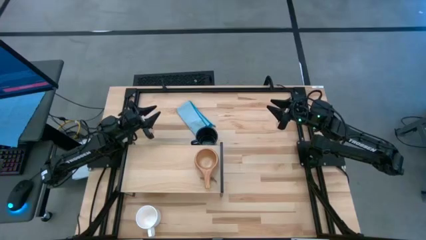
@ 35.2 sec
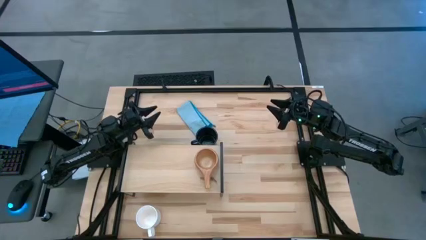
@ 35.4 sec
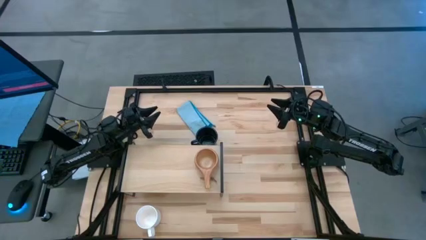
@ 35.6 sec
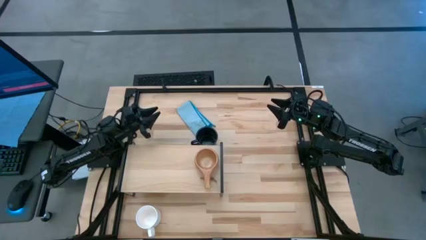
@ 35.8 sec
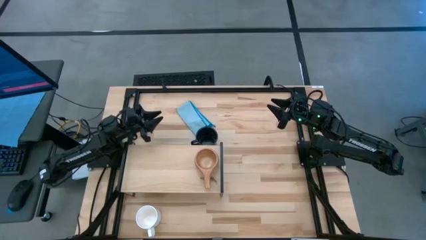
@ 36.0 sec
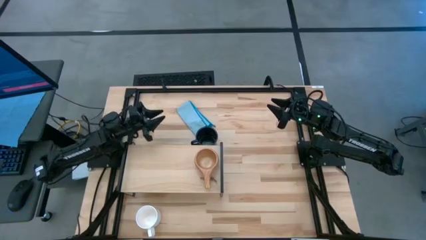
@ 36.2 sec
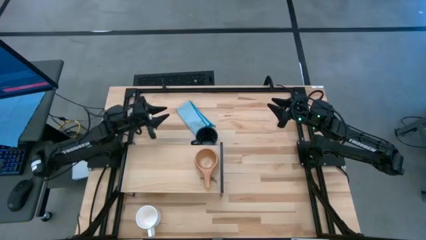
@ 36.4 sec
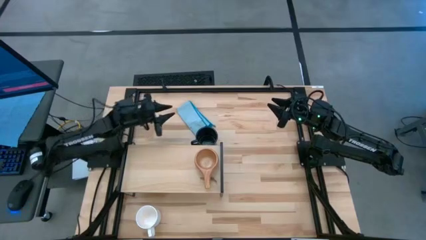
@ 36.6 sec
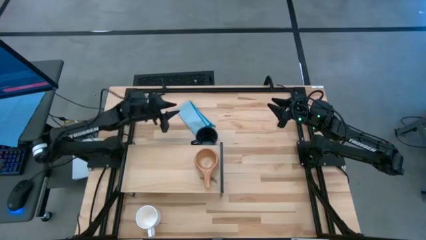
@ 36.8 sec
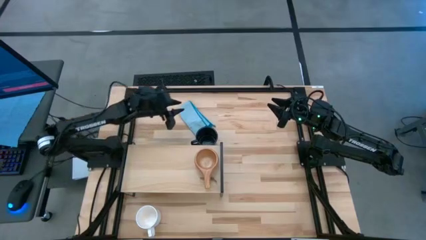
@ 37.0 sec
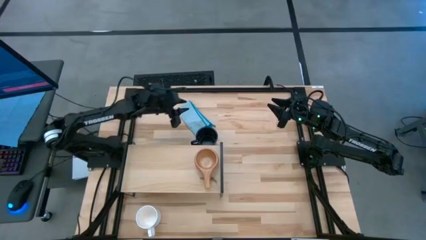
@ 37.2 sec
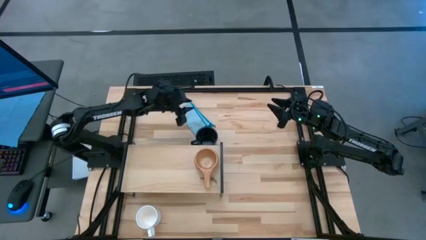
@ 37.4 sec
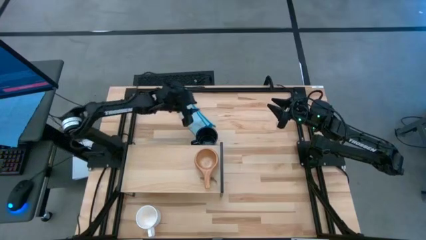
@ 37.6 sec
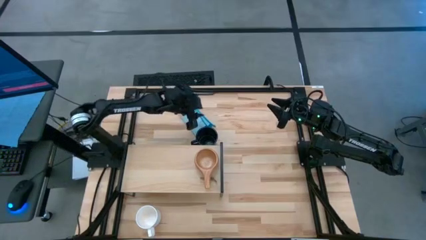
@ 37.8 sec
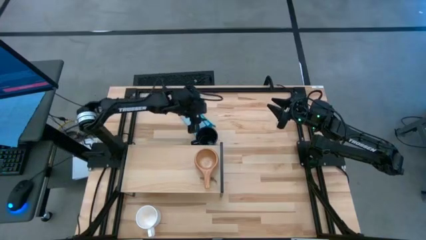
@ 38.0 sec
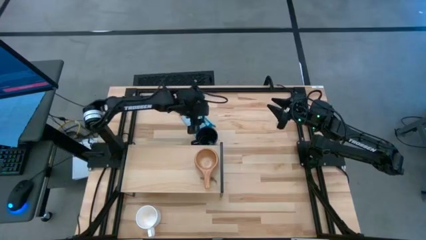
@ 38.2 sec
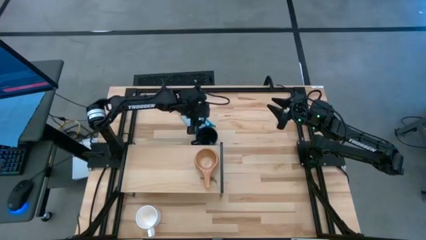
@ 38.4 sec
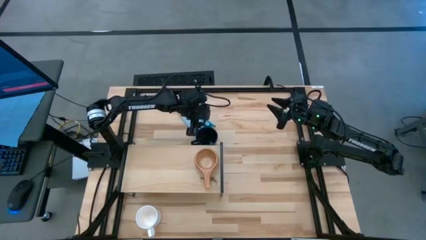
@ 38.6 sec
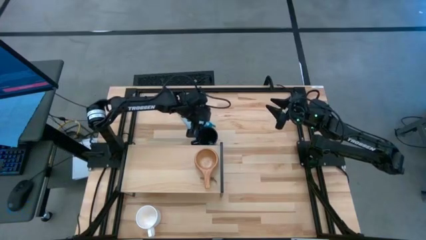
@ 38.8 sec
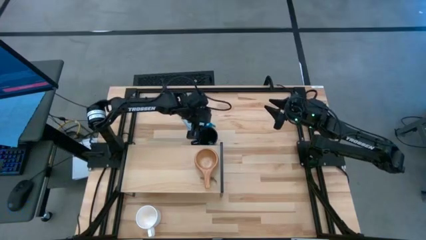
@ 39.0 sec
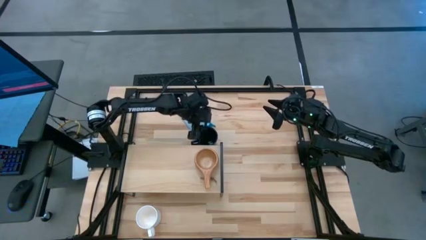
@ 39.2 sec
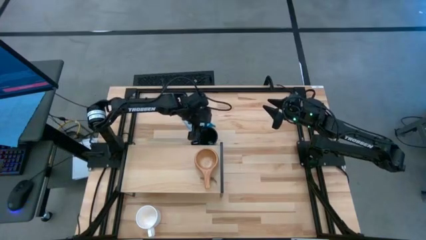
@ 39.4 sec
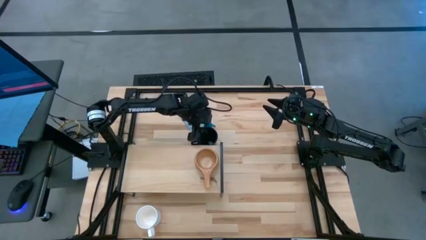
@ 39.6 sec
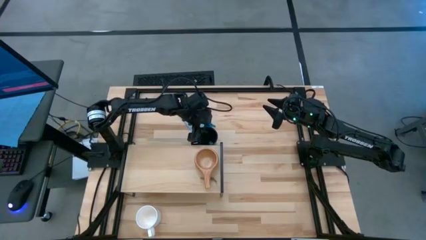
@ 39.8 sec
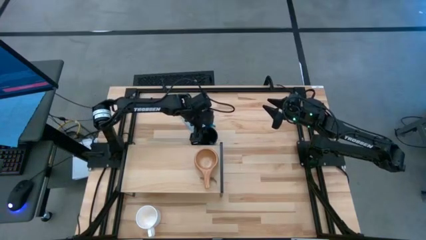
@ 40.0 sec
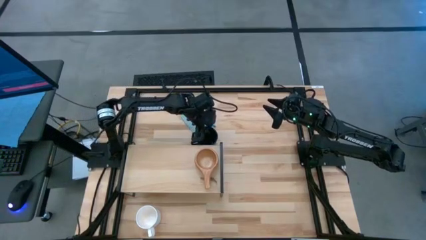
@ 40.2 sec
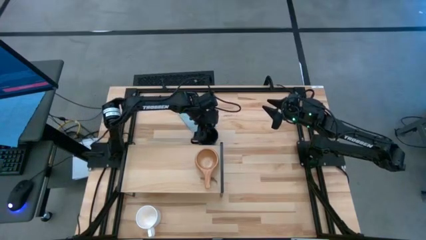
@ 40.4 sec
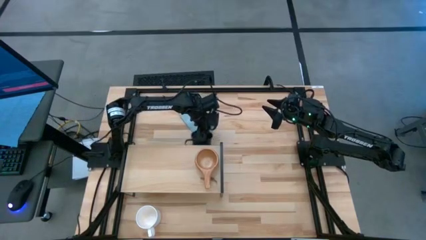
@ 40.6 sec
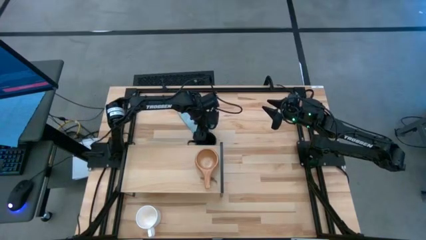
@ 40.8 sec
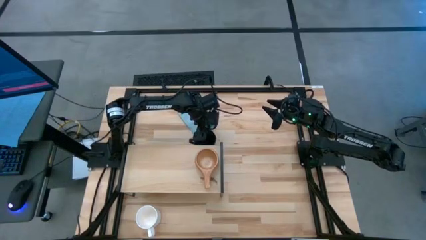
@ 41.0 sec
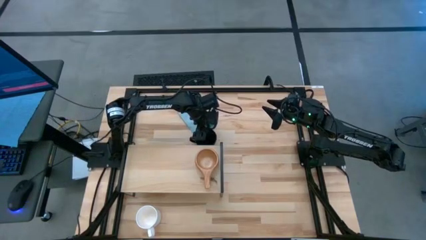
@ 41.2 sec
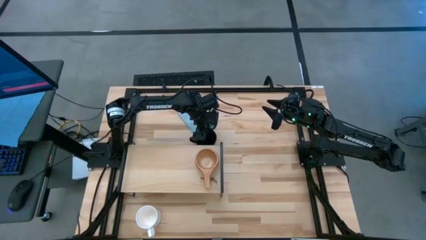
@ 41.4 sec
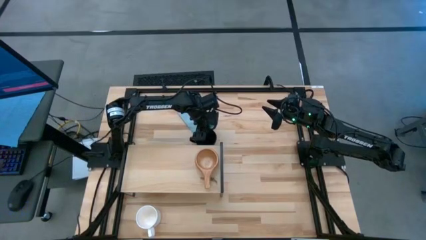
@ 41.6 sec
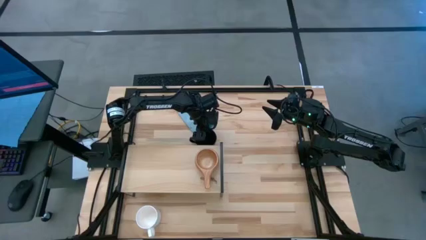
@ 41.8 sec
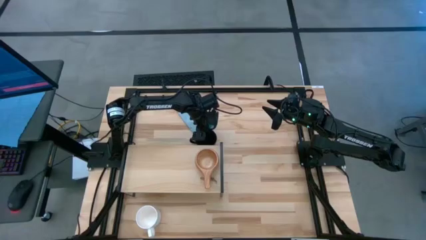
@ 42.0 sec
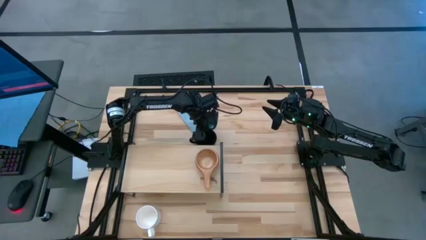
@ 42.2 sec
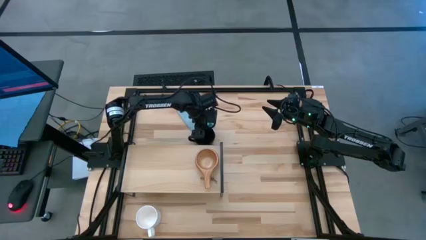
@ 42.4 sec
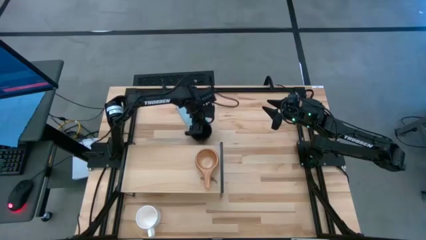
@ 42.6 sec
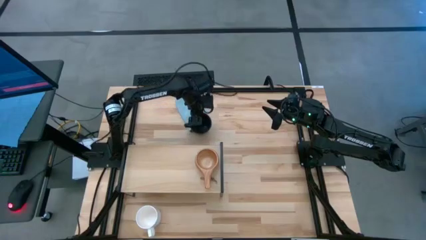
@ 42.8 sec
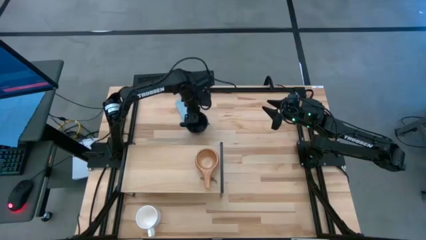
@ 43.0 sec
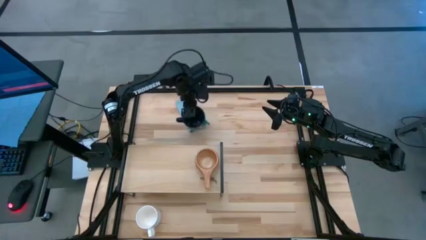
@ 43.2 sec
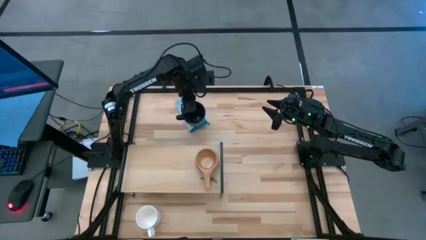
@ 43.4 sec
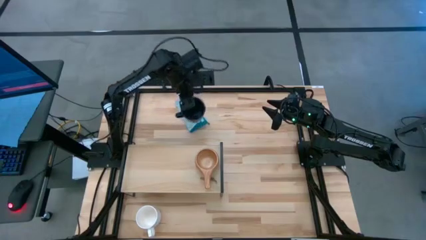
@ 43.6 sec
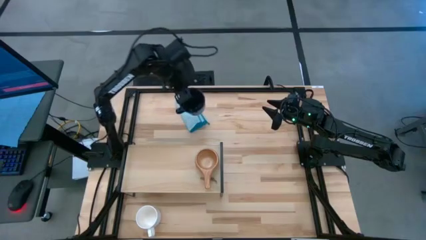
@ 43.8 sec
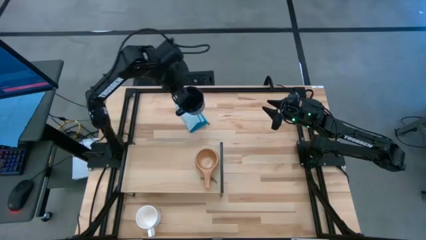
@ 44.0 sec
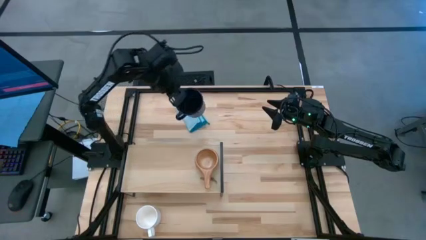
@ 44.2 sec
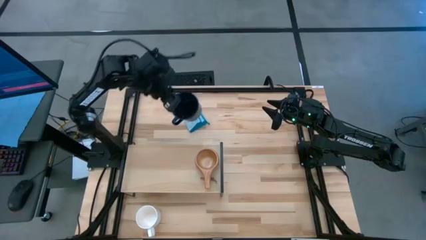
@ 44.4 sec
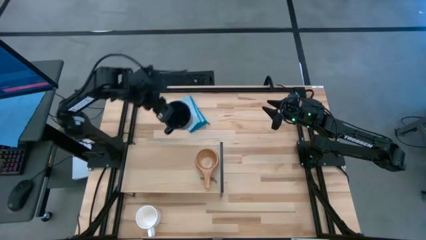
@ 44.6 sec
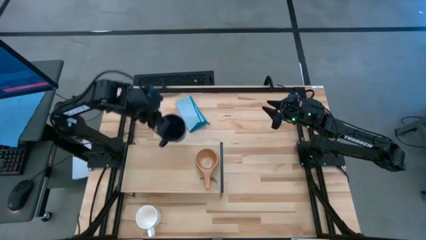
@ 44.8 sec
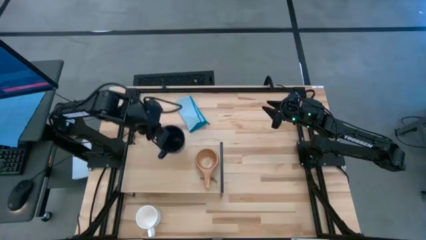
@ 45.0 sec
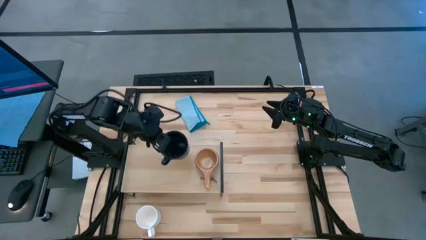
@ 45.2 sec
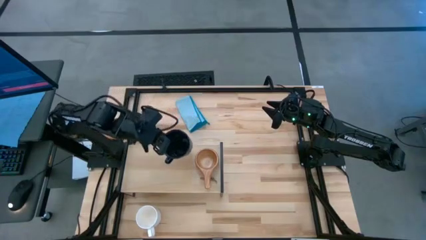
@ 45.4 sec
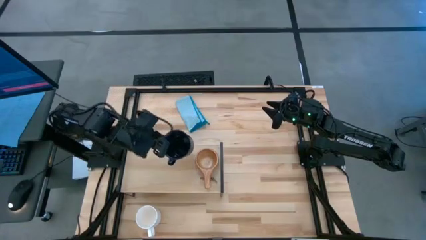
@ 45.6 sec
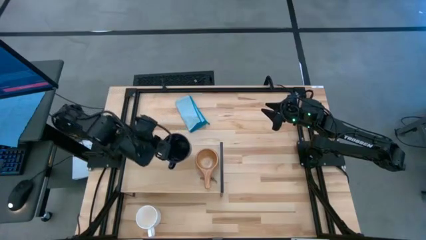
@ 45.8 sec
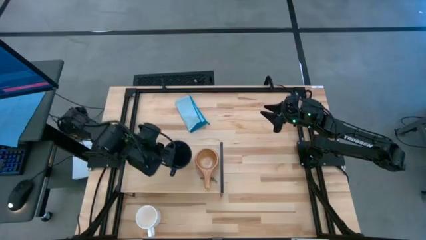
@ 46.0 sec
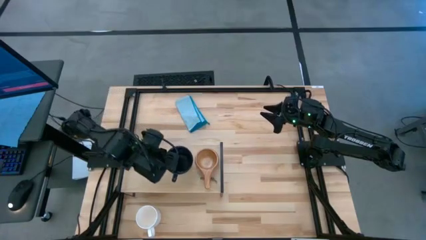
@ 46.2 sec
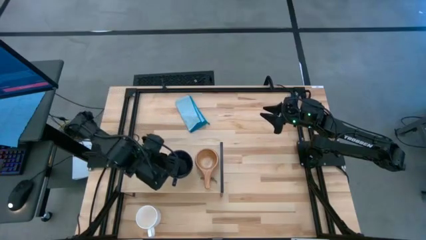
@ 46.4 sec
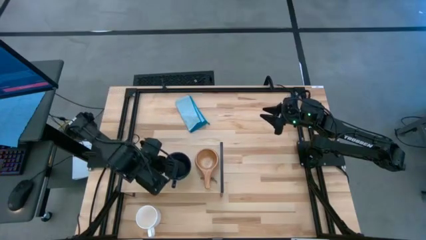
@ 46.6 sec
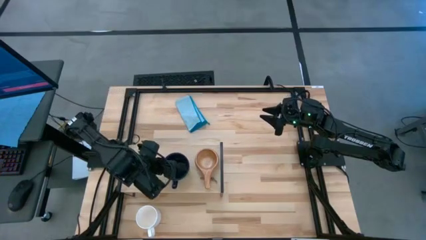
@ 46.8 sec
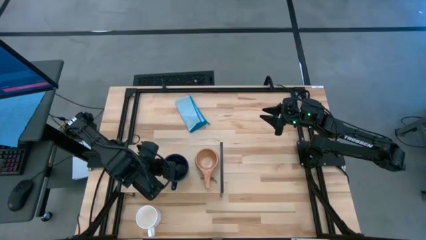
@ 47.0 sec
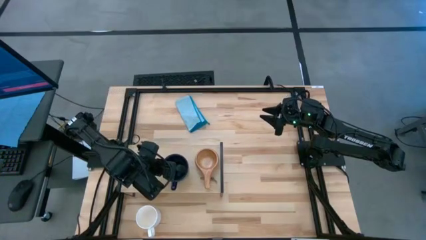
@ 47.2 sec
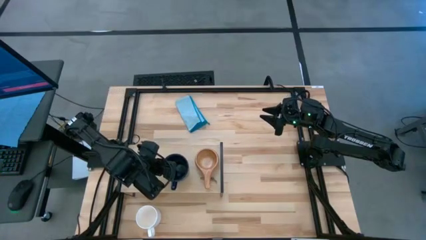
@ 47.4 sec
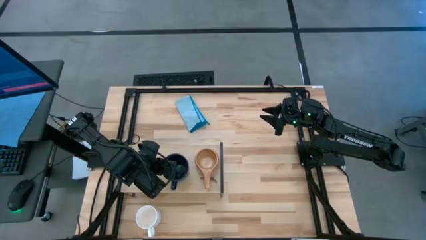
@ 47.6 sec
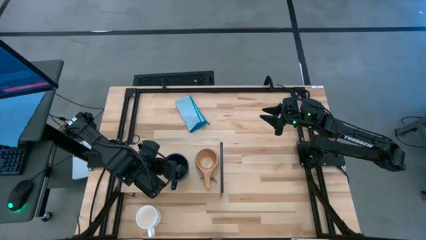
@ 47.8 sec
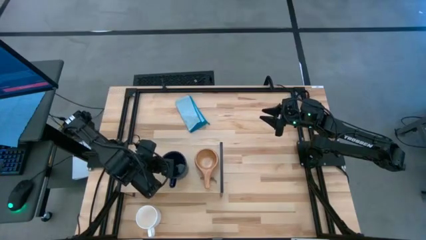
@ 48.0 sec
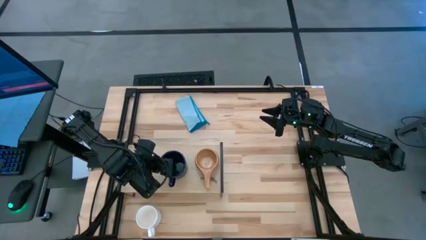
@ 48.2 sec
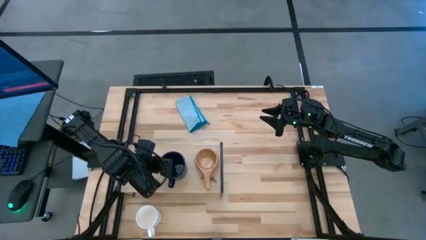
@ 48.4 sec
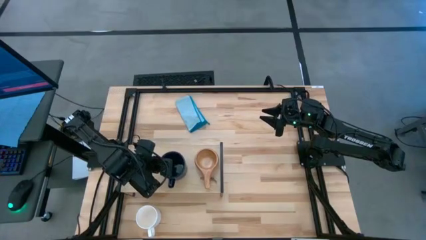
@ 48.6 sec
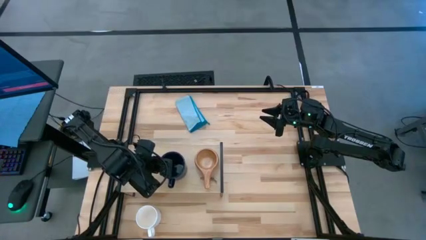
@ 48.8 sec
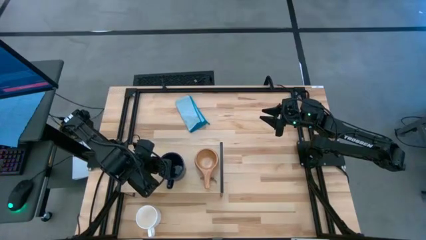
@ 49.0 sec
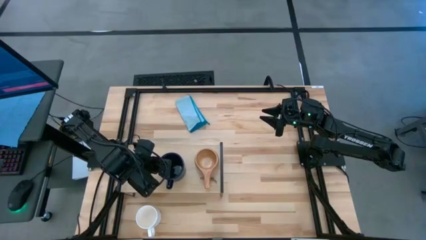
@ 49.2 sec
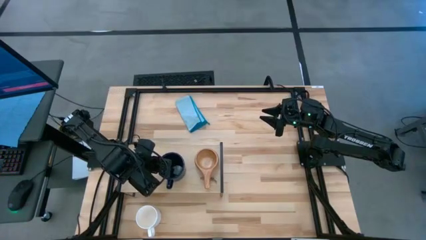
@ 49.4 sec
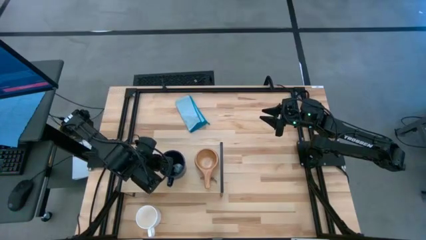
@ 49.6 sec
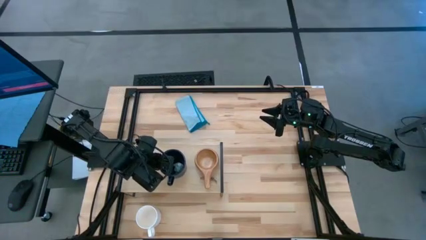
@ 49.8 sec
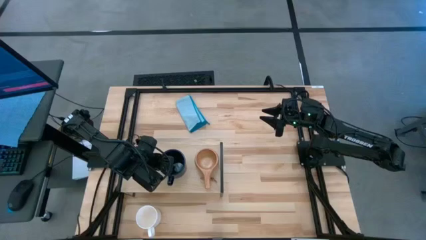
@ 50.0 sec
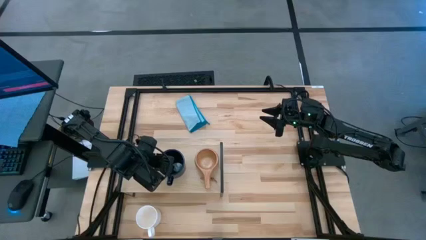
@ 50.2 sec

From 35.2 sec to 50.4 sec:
Task: Stack small to large cups/mugs on shelf
Put the dark blue cup on the shelf
